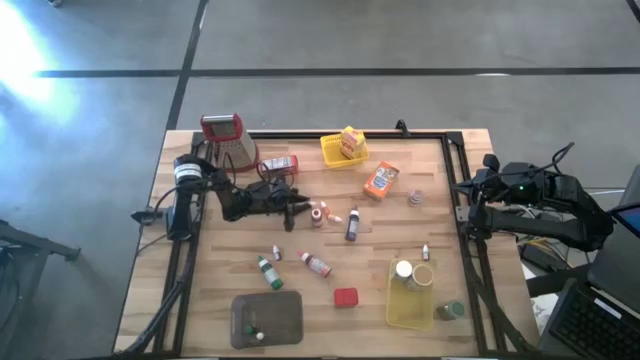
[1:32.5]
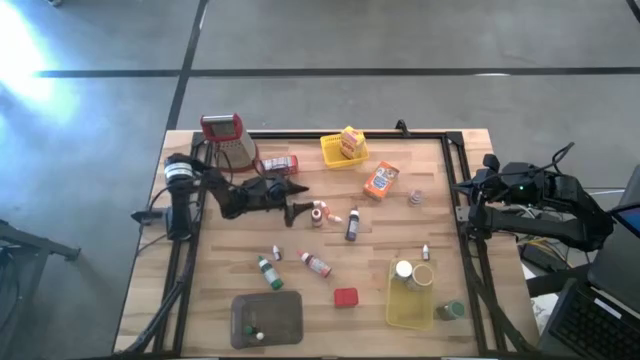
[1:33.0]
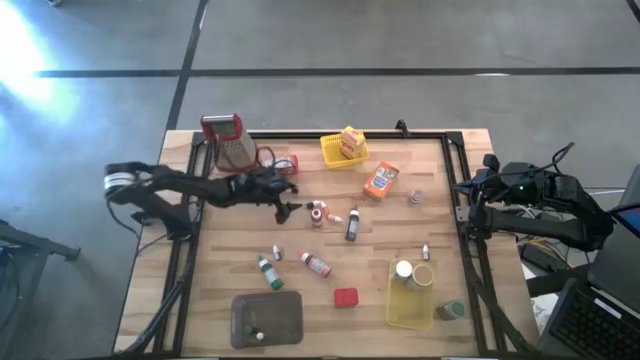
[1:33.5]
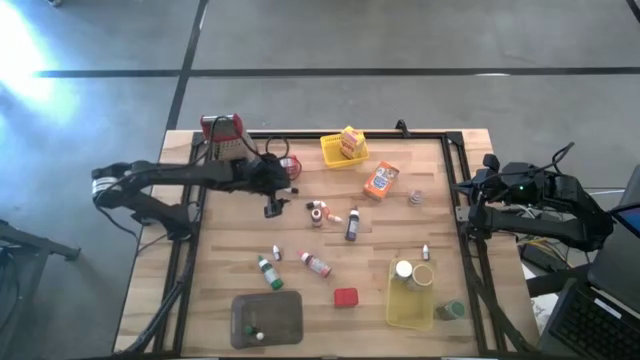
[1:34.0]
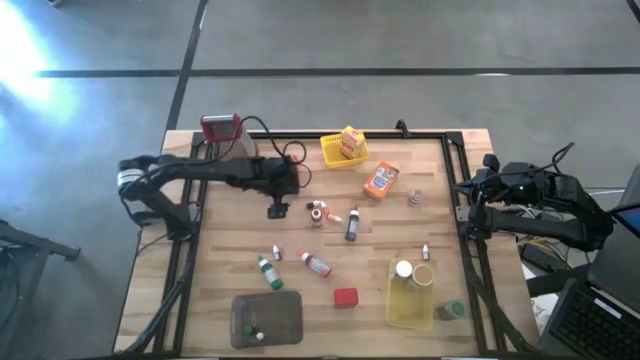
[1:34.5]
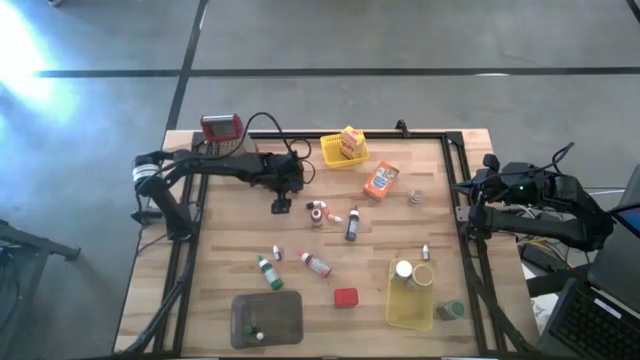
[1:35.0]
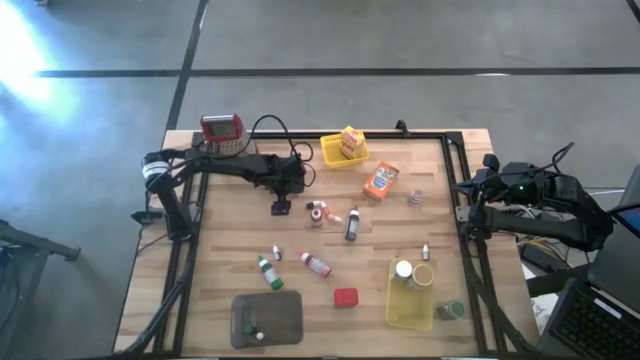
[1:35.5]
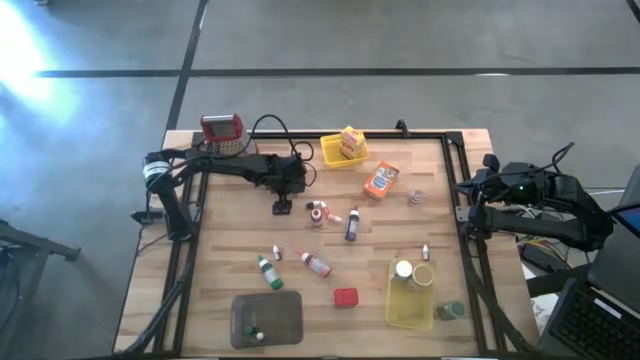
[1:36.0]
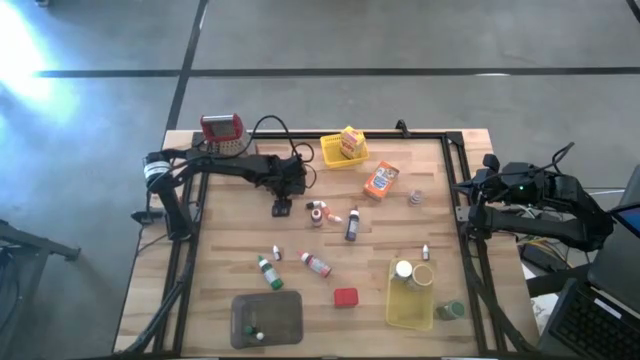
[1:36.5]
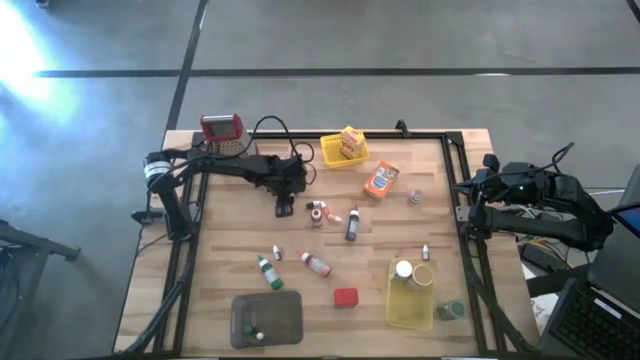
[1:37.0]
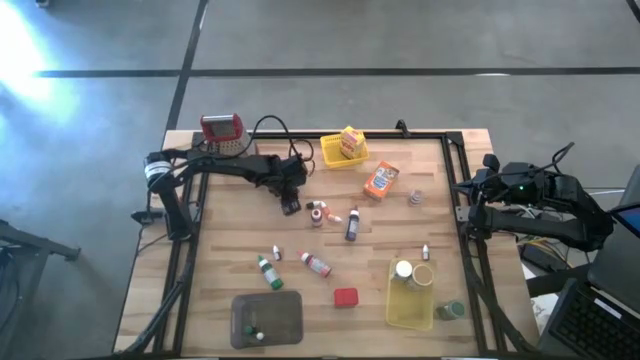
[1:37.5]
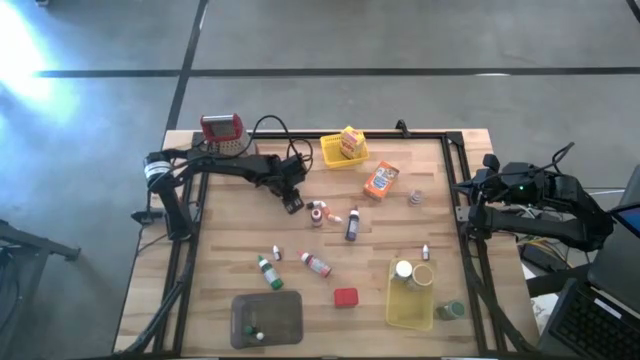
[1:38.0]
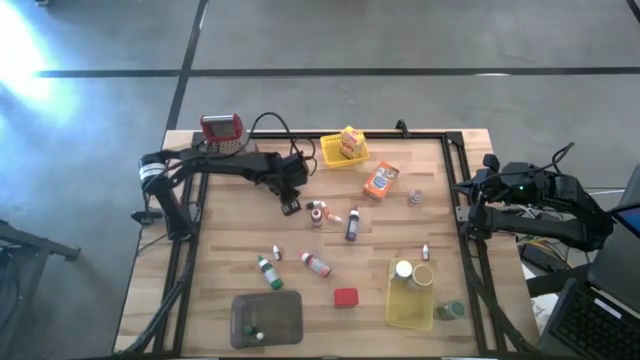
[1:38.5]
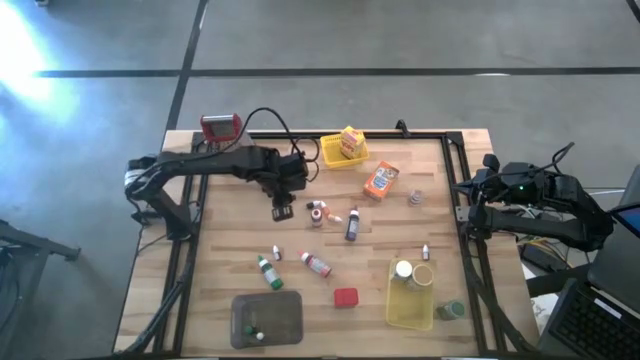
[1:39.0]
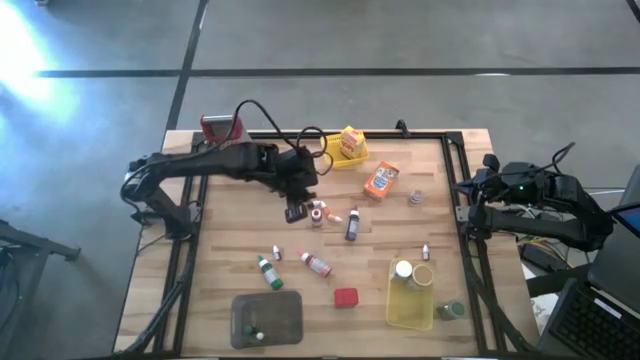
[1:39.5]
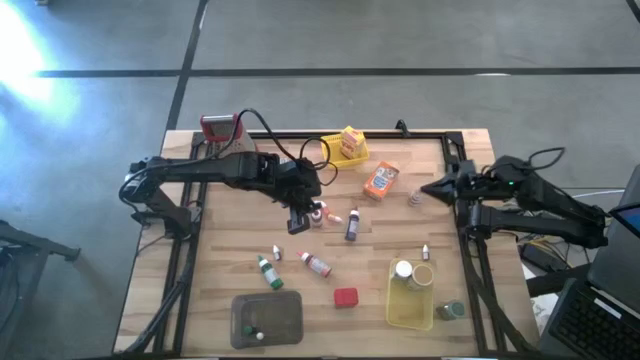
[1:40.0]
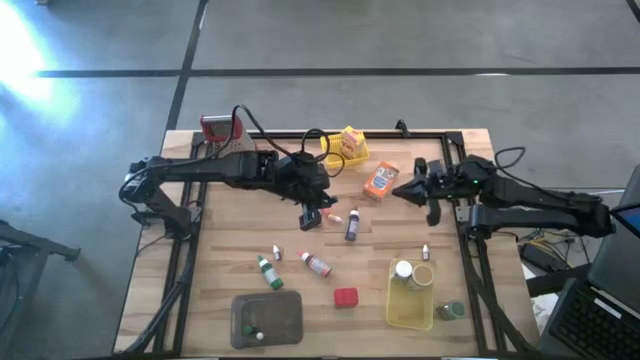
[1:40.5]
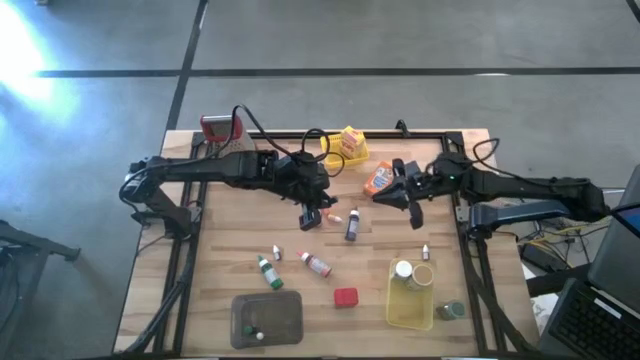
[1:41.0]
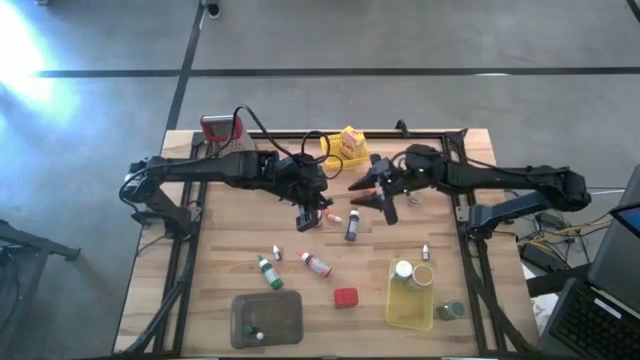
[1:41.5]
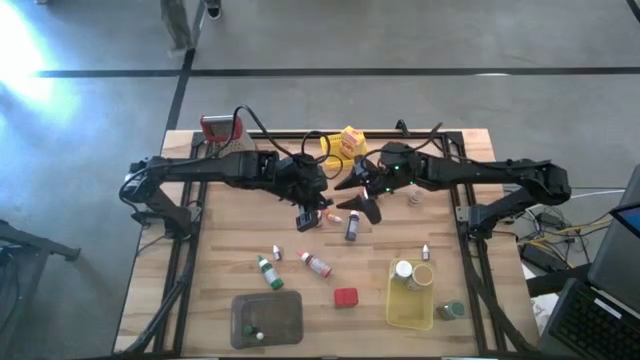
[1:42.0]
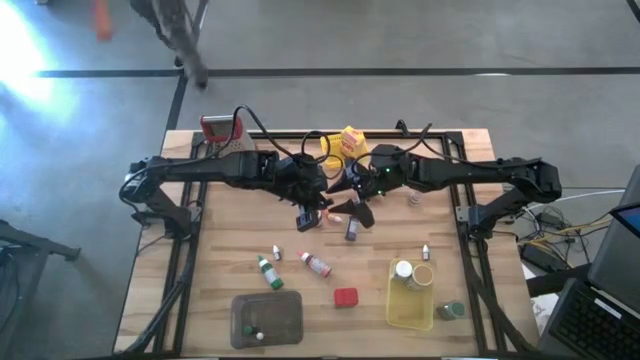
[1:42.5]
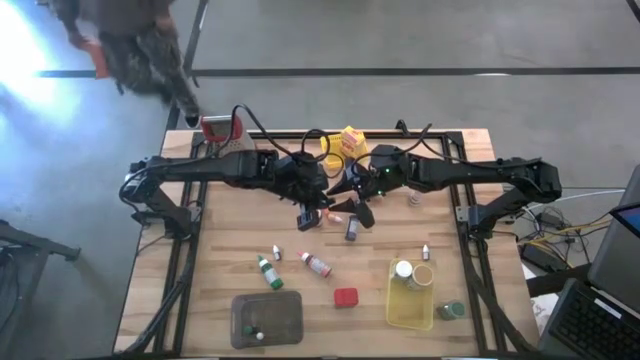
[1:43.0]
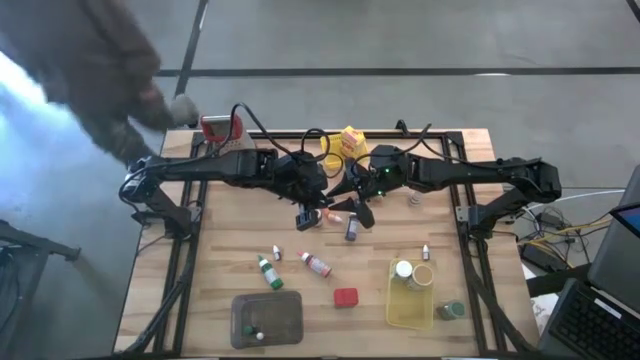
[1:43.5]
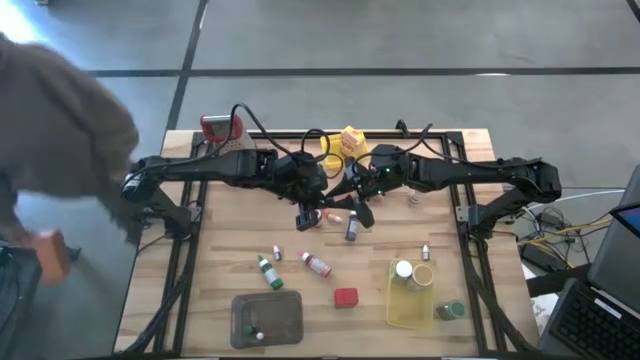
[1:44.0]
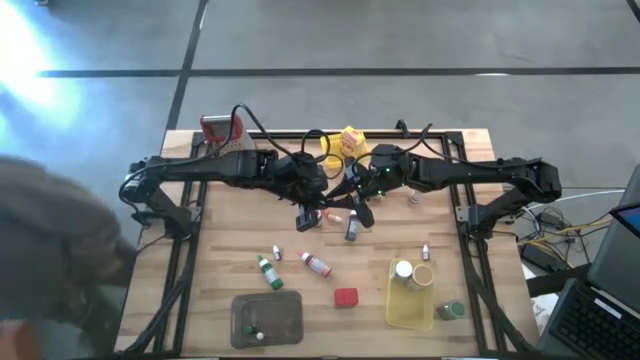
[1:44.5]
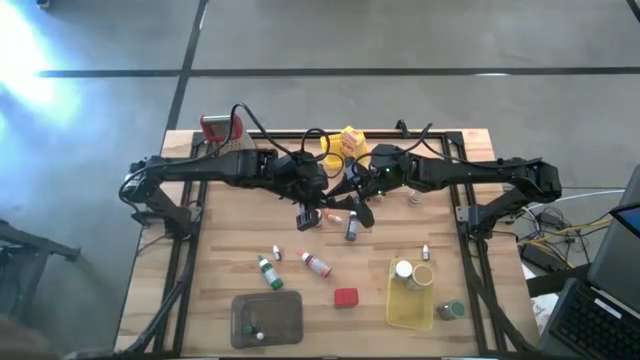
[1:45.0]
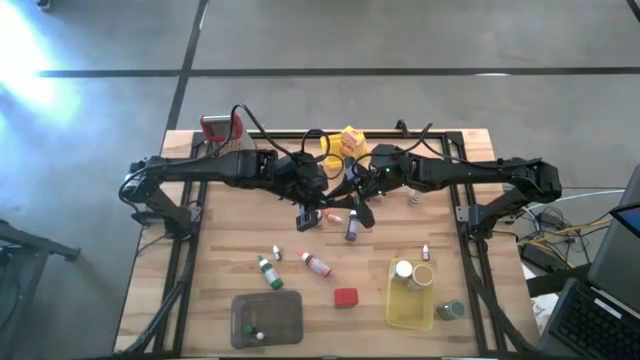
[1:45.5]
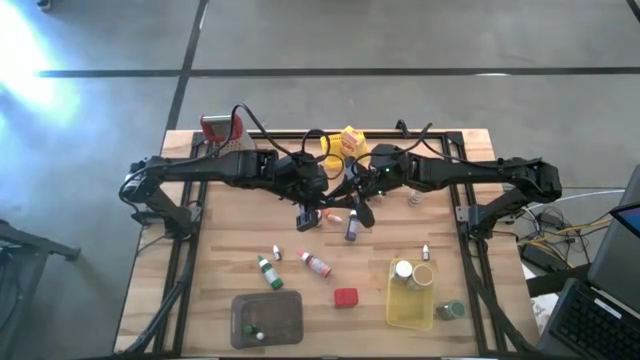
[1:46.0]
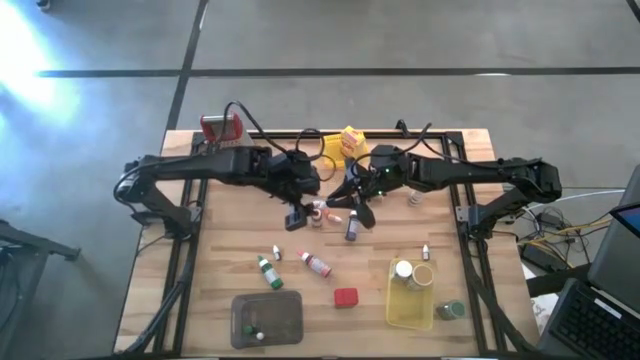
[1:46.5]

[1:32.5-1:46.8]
Task: Pick & Place Kitchen Items
Put the small violet food coloring bottle into the black bin

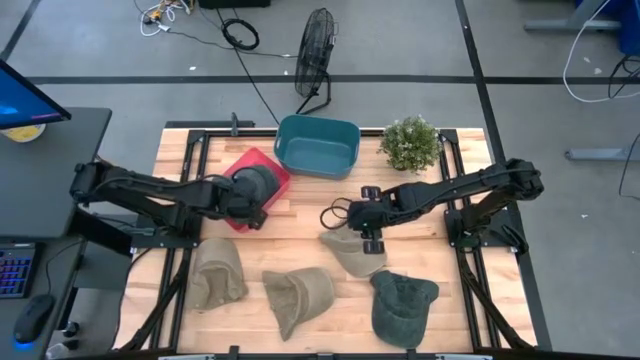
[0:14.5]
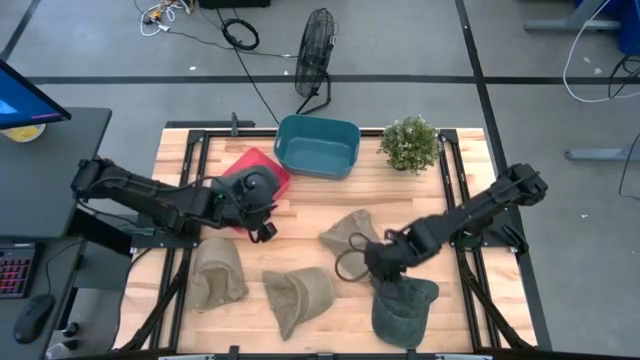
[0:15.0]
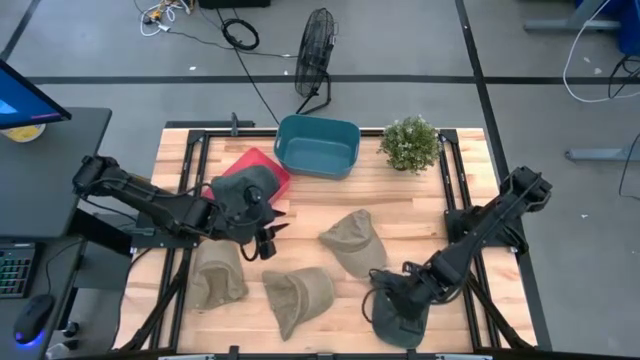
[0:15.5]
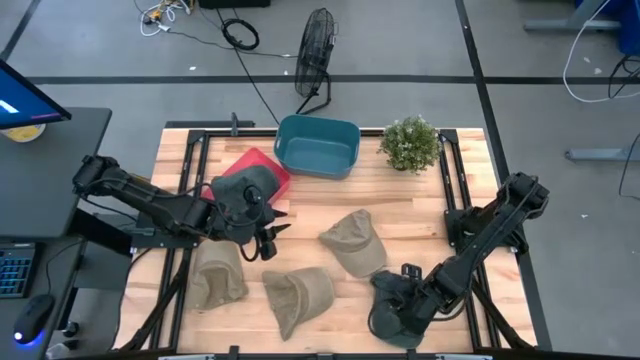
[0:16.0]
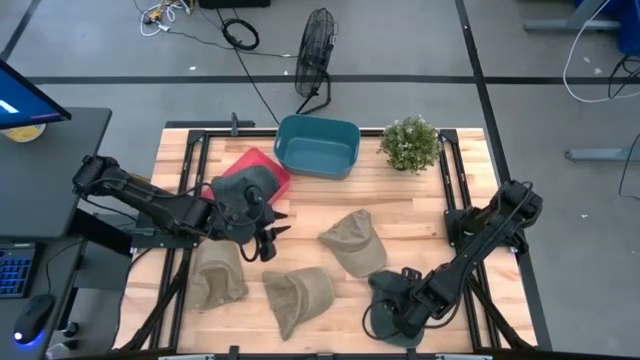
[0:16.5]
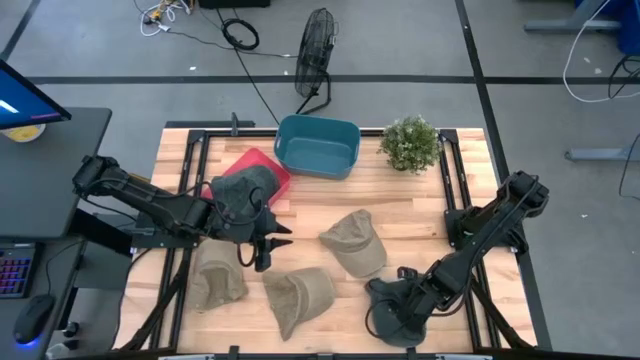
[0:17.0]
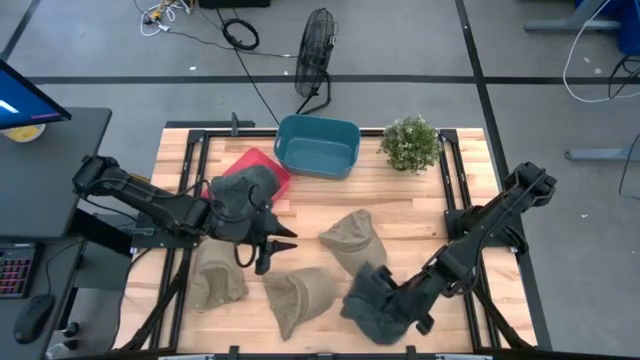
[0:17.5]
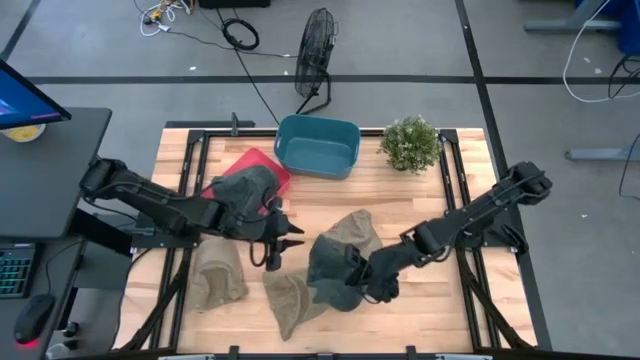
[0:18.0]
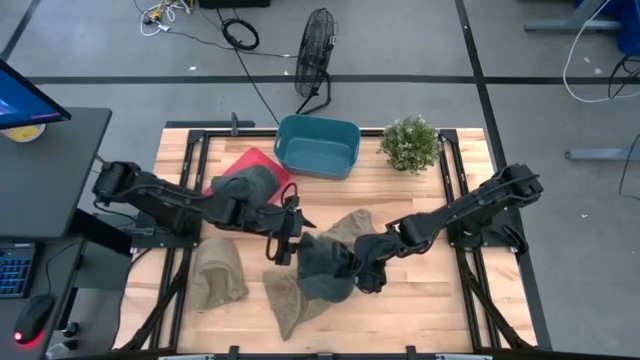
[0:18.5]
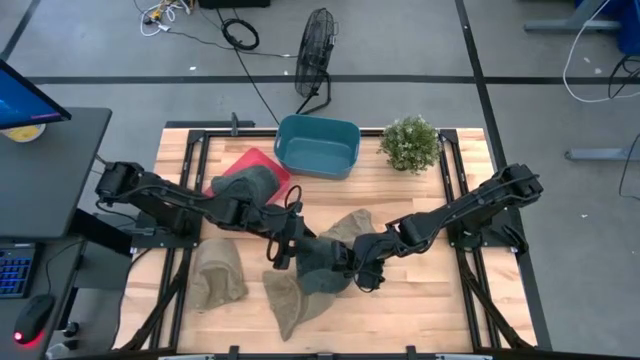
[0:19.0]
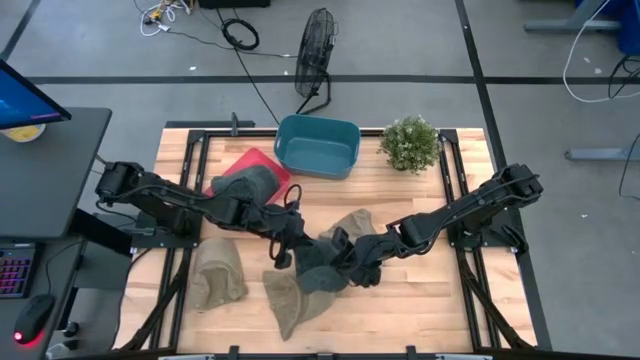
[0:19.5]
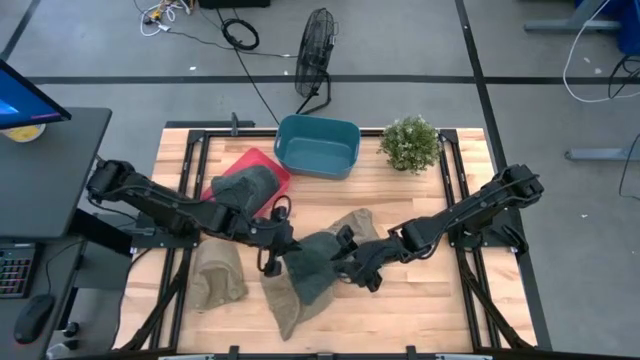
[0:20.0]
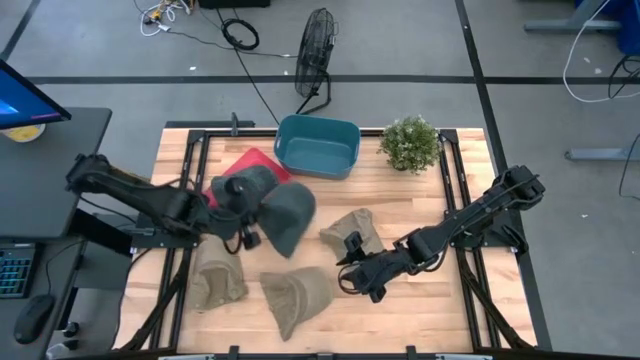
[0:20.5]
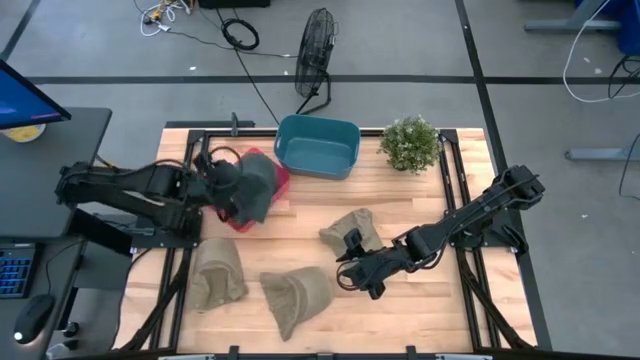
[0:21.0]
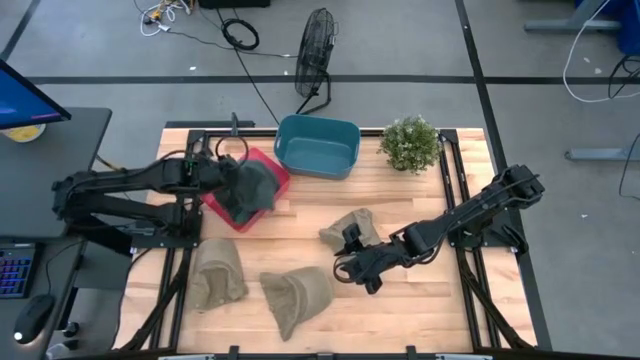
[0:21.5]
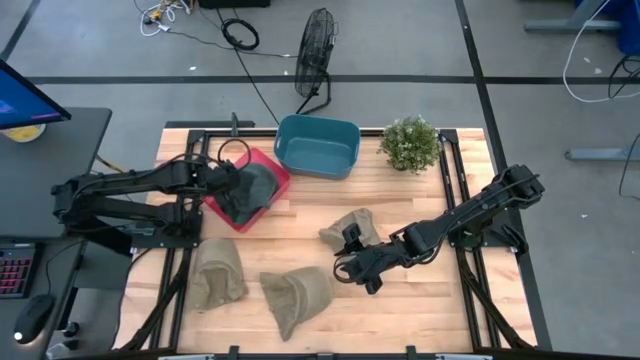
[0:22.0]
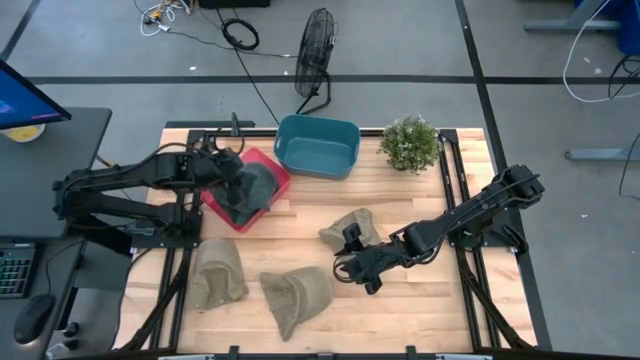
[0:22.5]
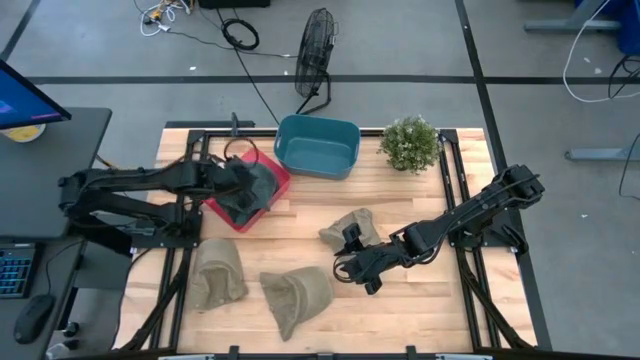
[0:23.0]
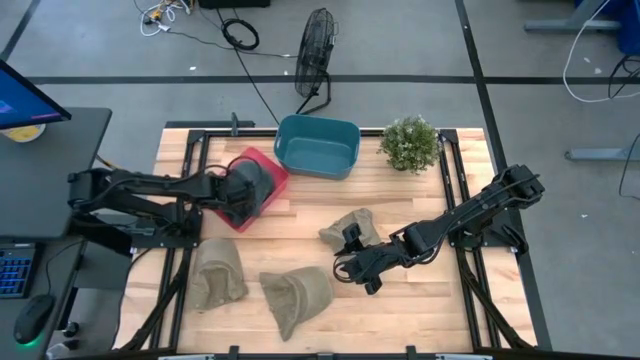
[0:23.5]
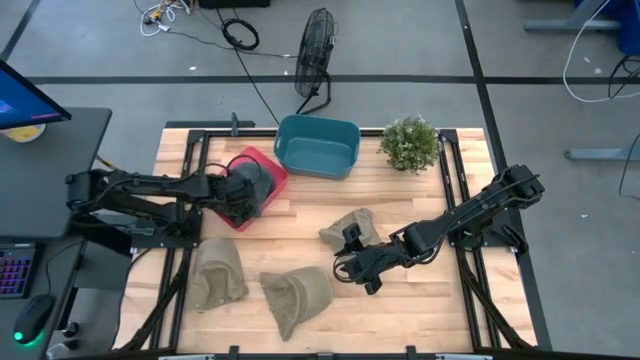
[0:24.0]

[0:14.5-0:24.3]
Task: Pick & Place hat
Put the dark blue cap into the pink bin
